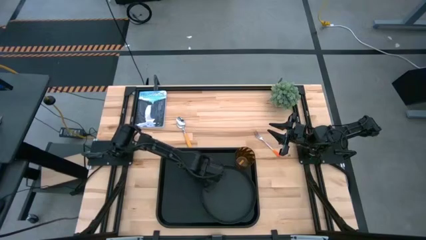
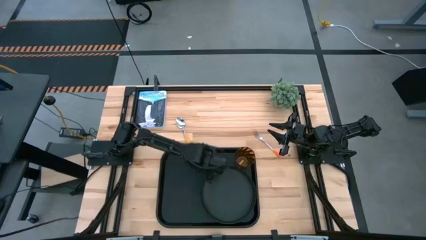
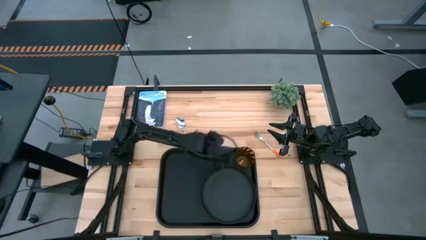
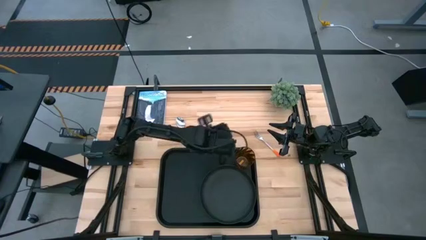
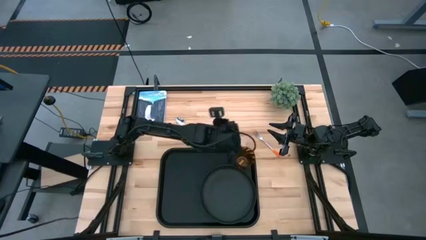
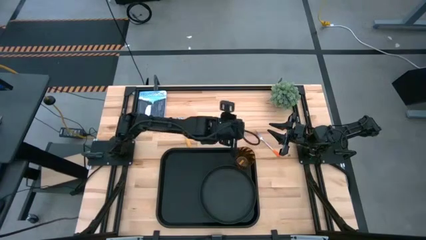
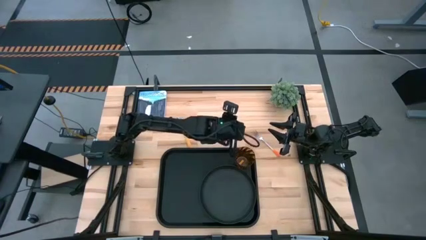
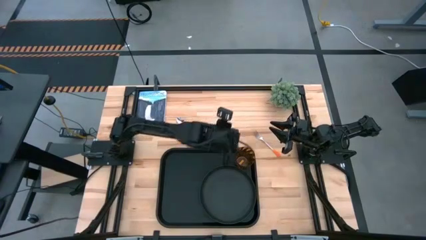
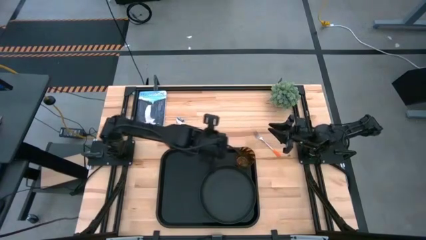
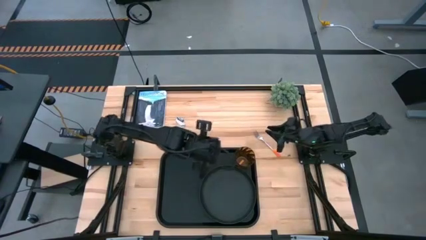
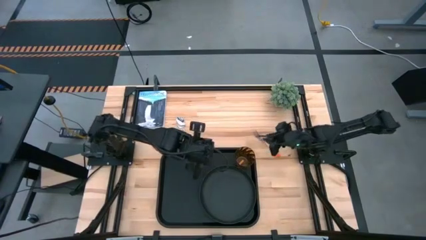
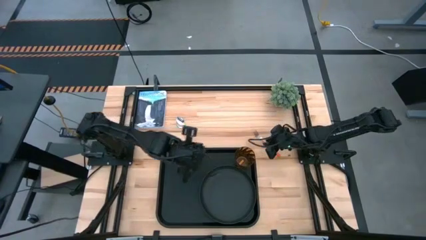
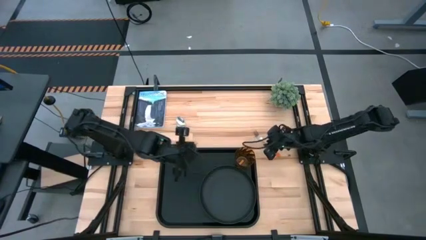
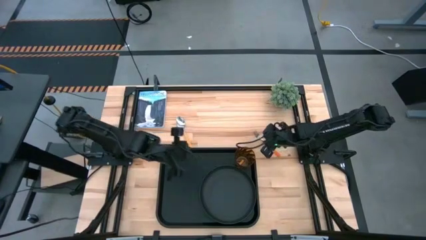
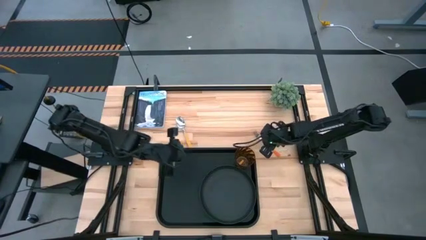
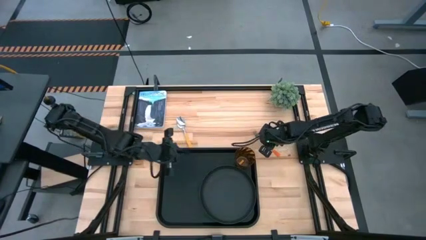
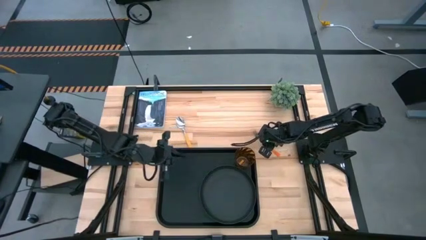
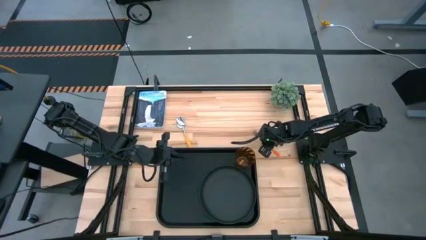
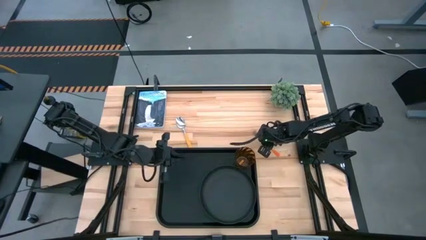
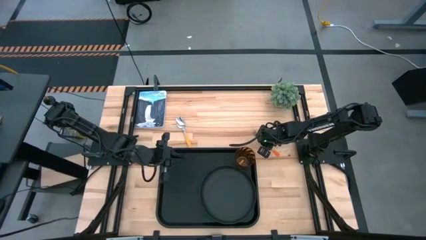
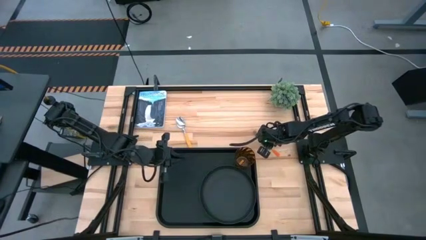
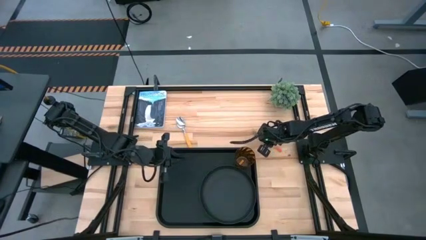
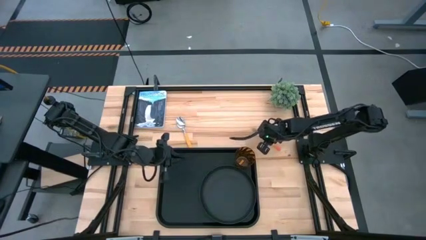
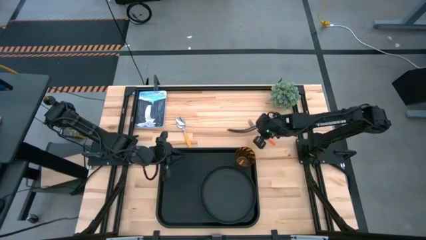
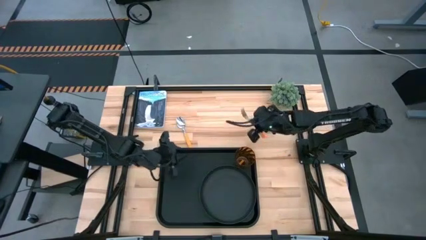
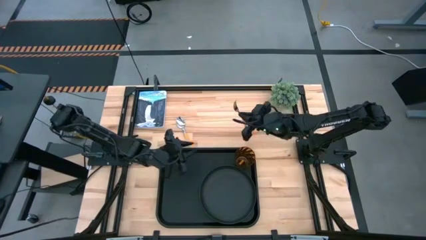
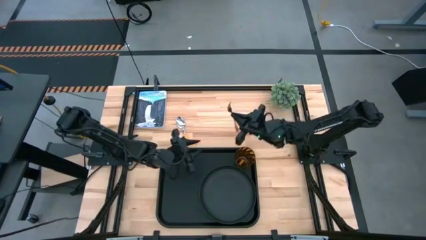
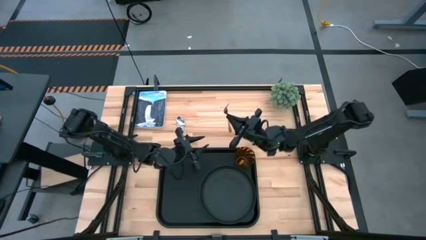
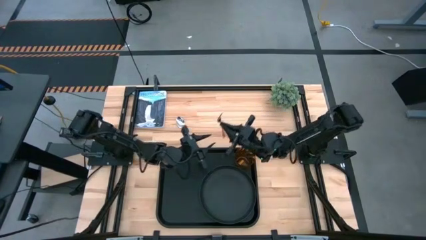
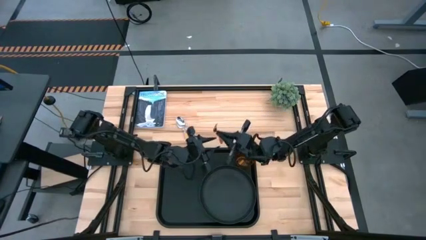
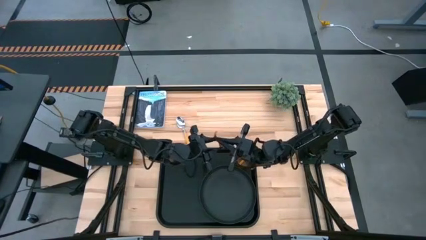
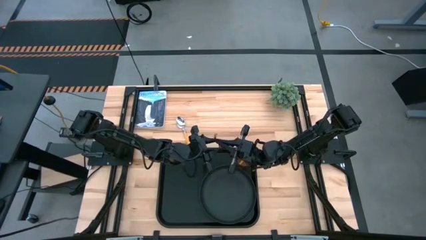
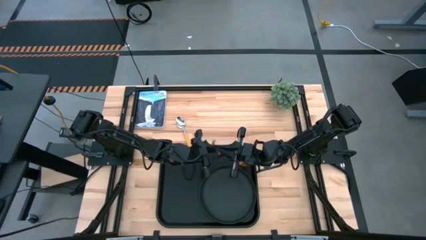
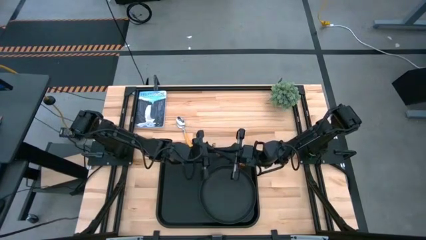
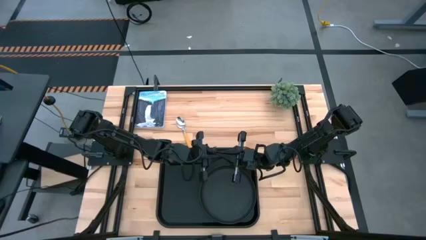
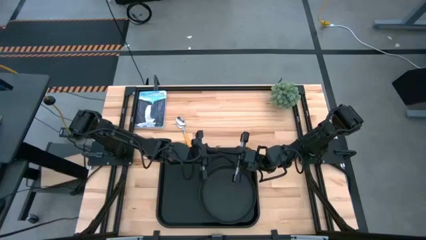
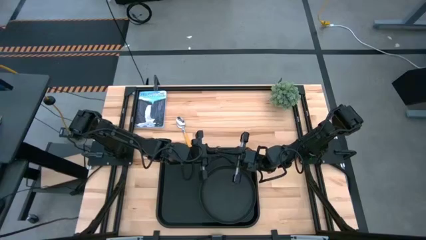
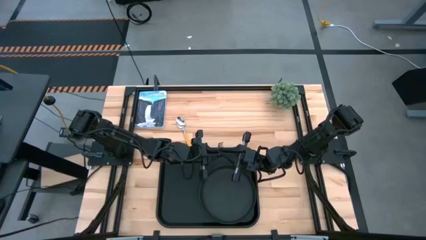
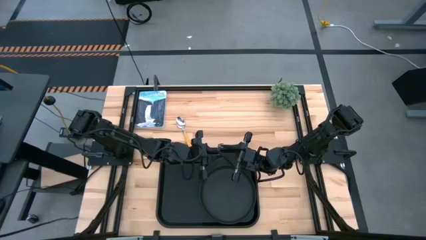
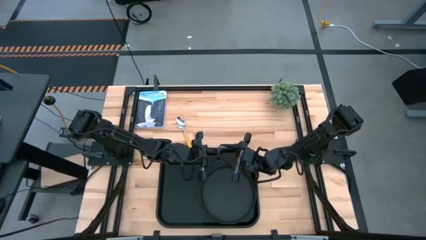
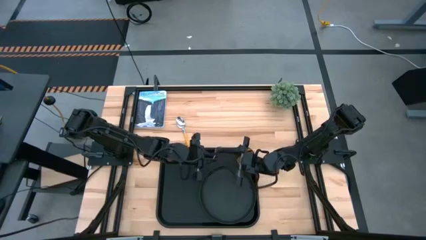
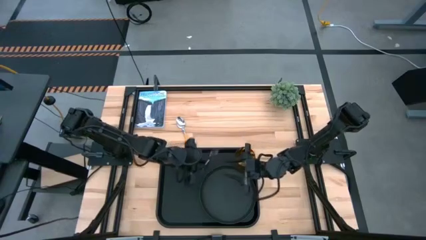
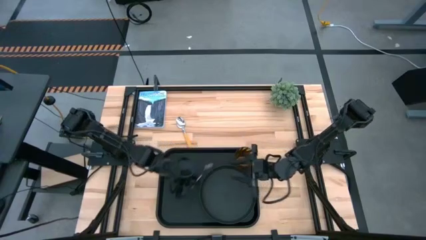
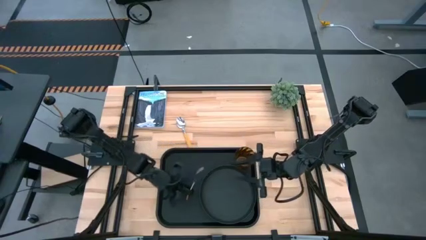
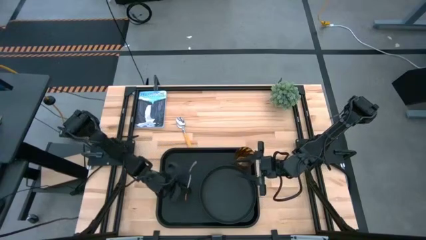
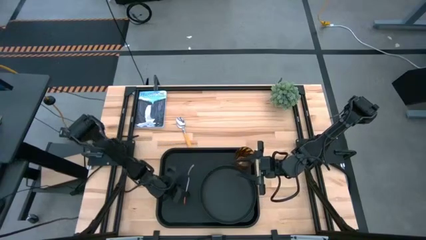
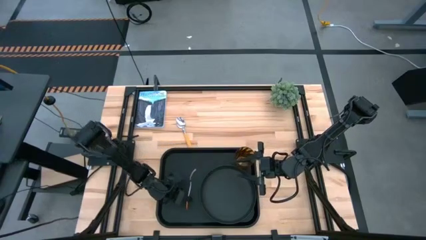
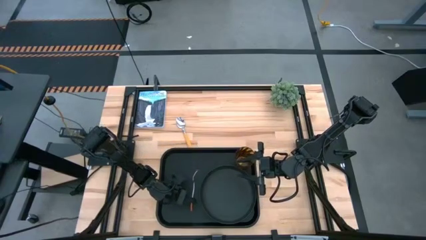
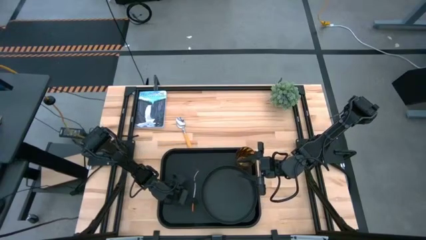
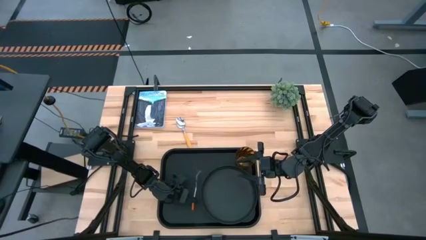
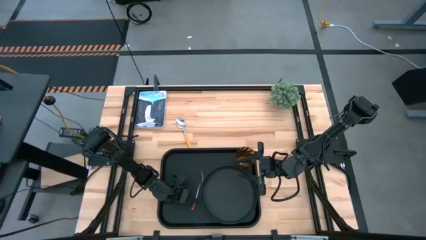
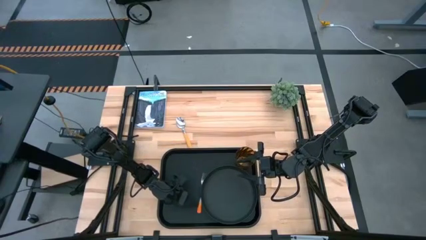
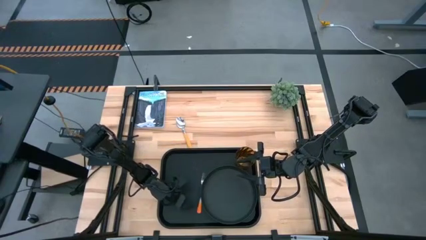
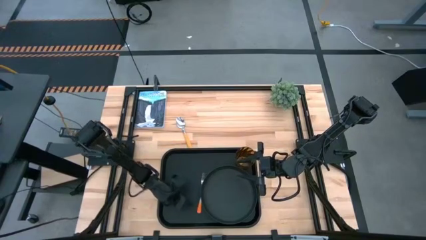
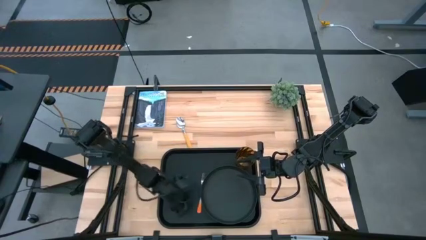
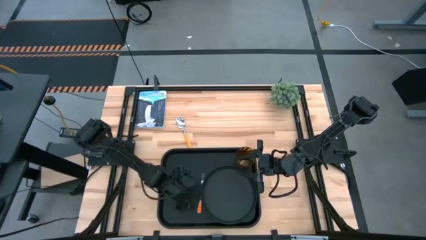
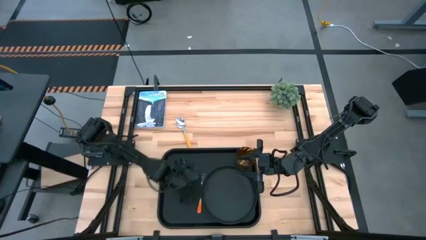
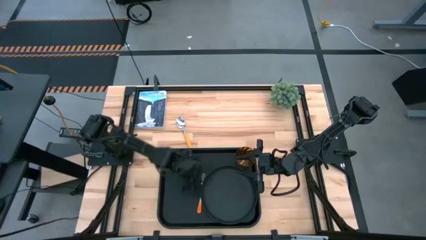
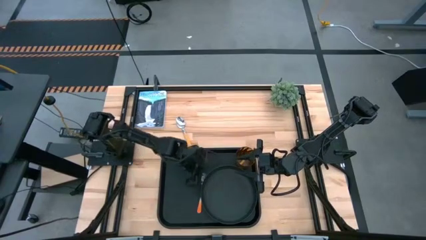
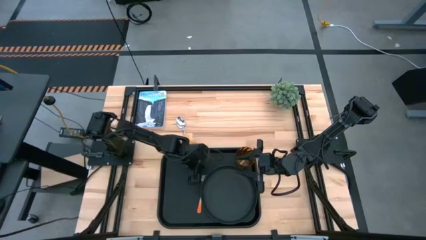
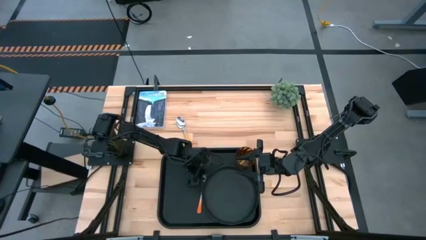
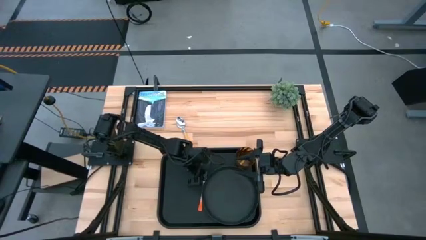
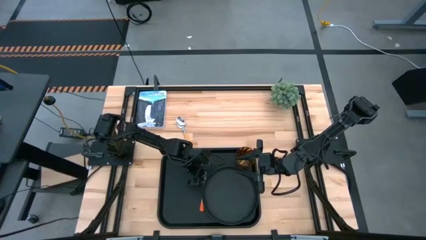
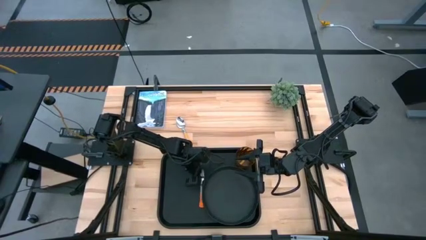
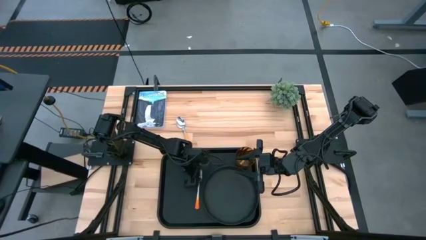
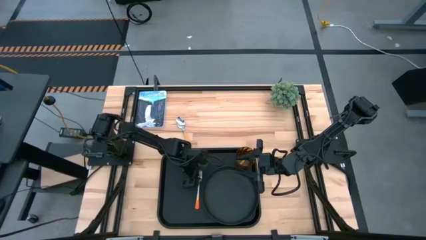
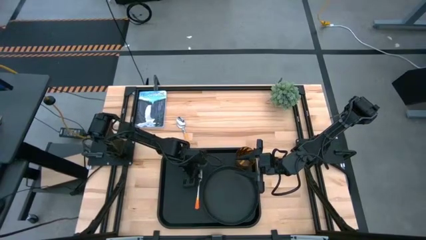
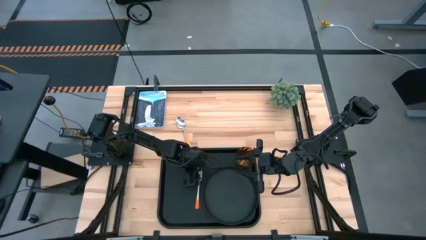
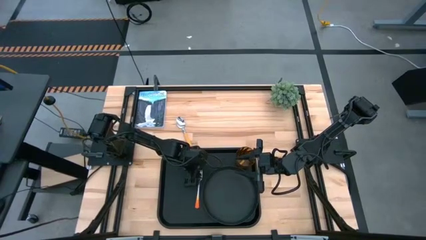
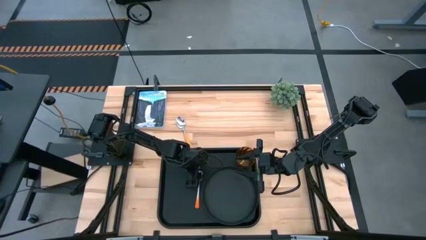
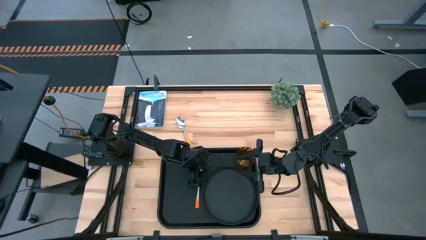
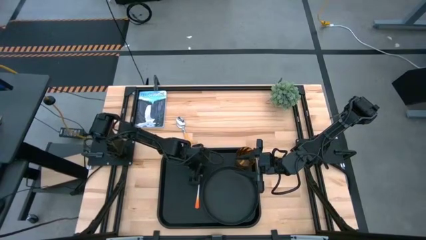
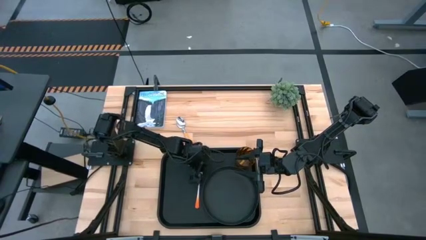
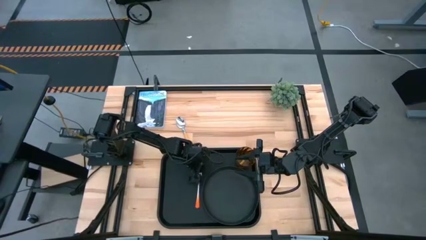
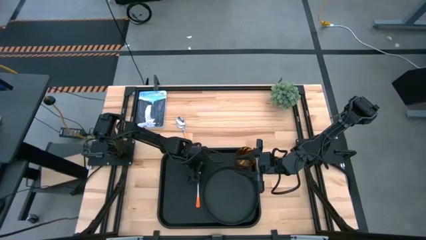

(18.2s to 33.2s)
Task: Pick and place plate/cup/fork/spoon on tray
Put the orange fork on the black serving tray beside the black plate
